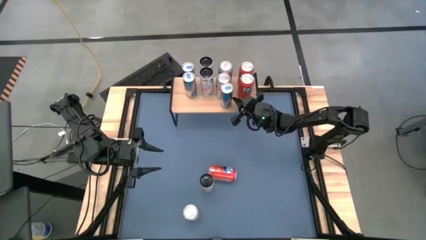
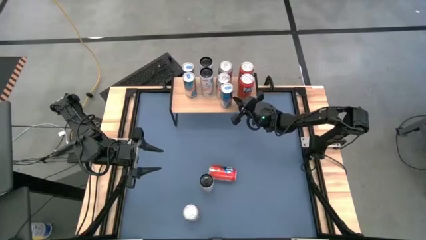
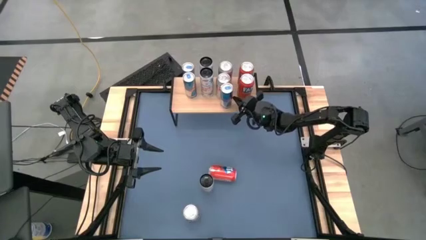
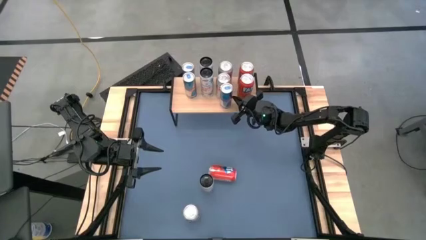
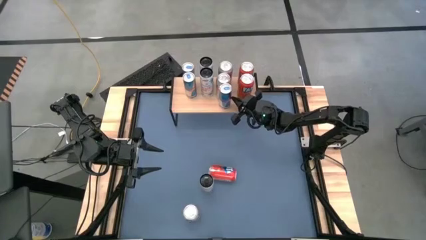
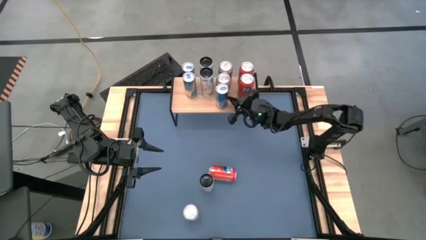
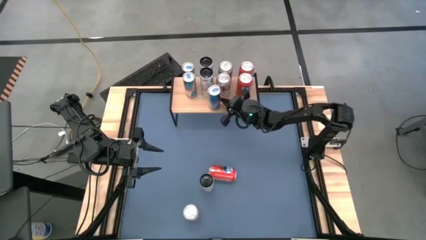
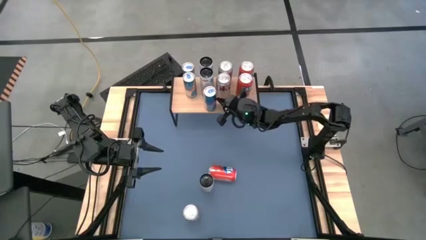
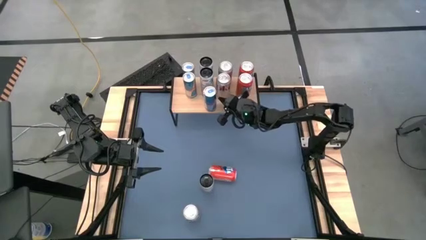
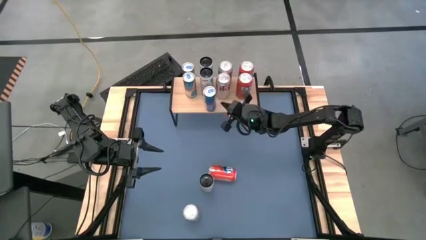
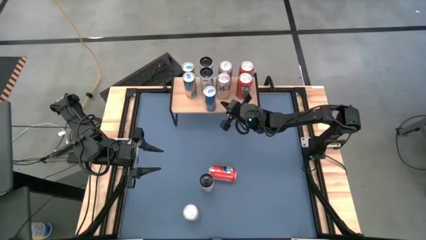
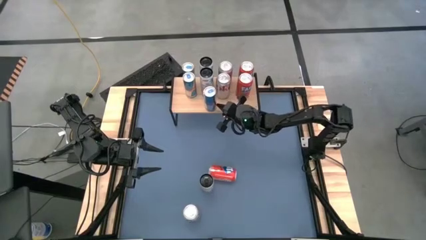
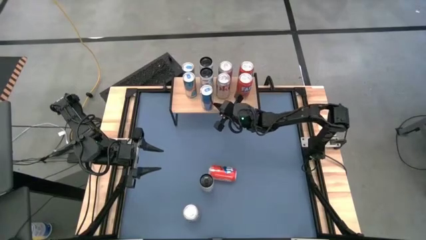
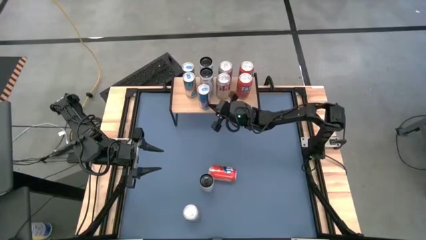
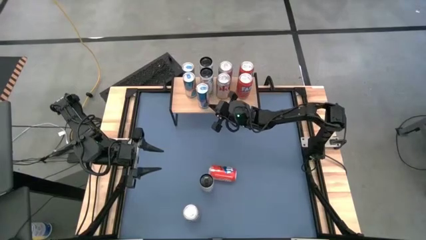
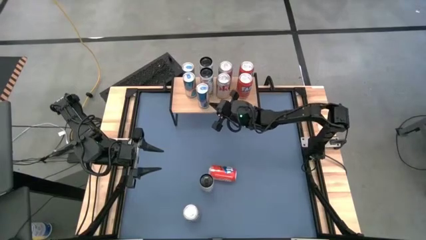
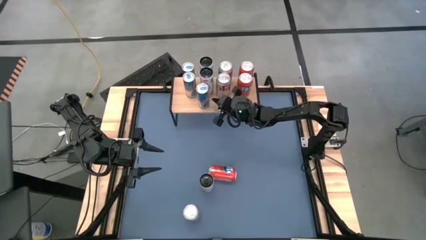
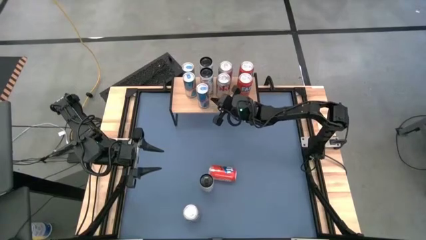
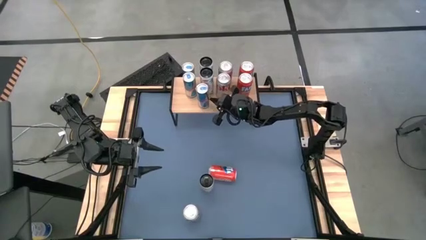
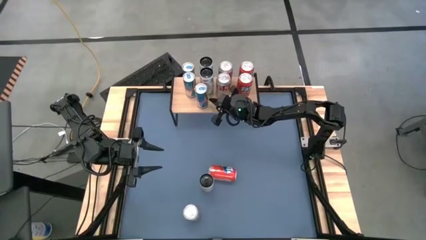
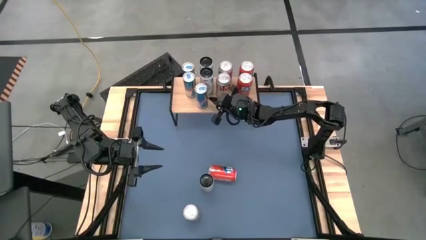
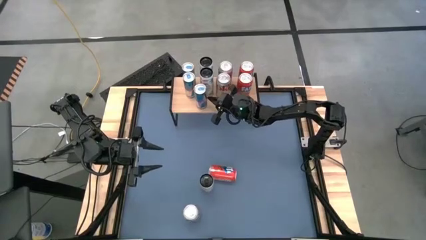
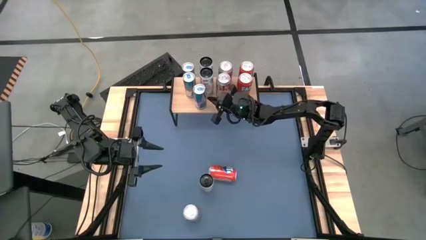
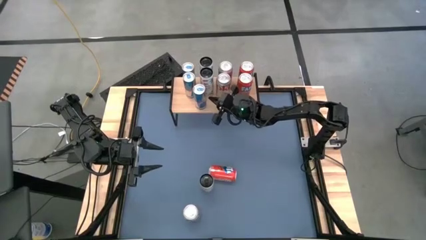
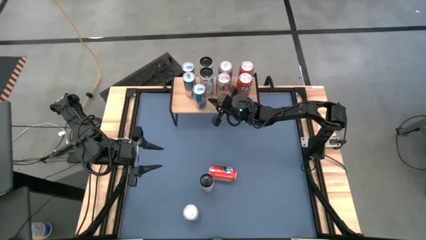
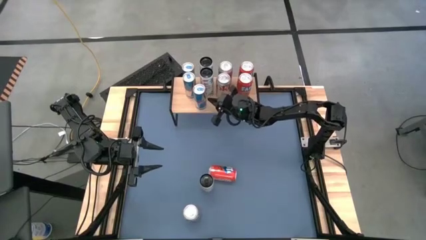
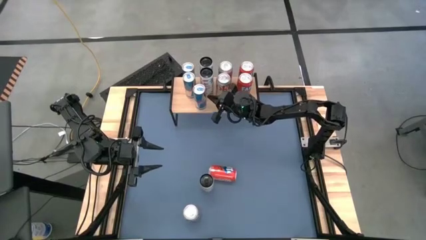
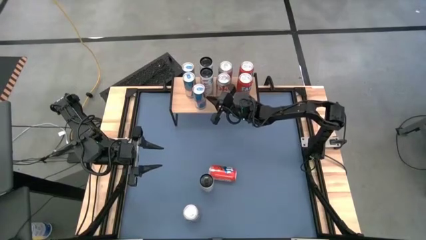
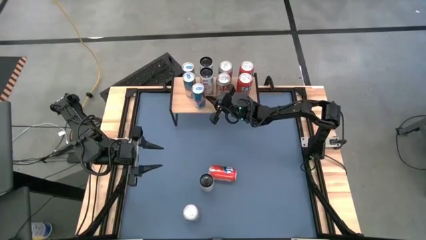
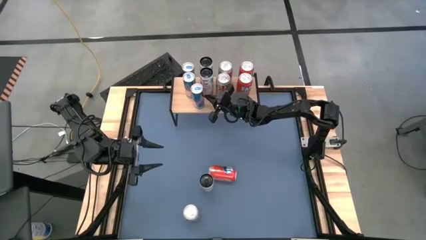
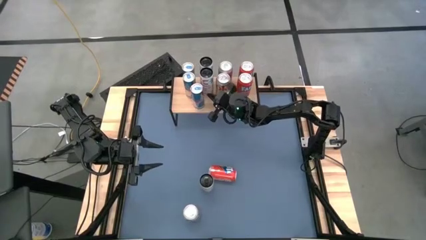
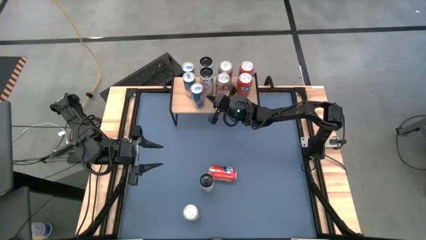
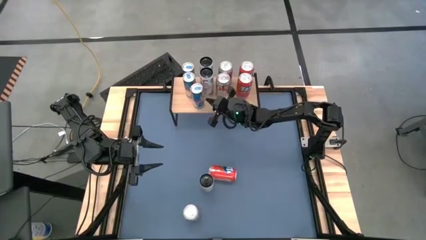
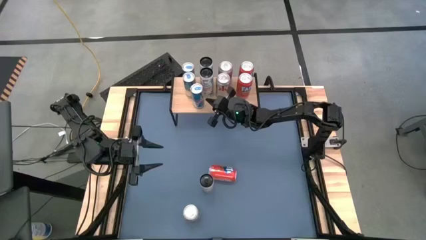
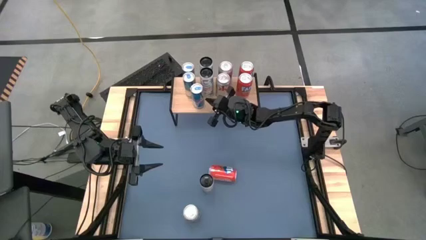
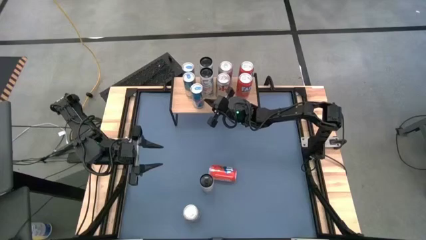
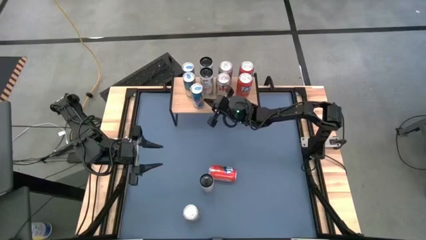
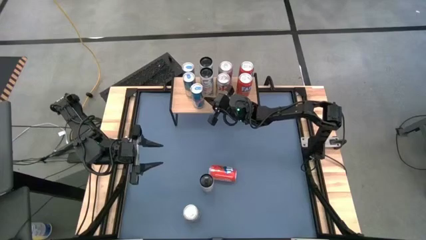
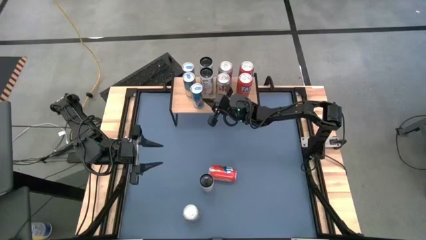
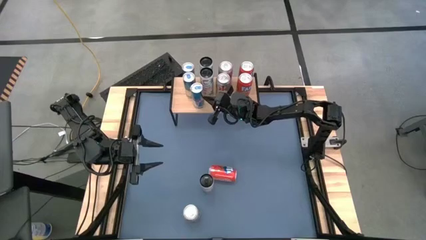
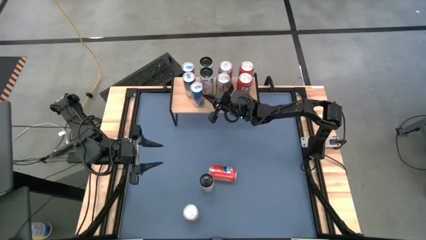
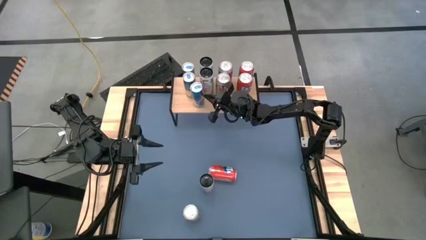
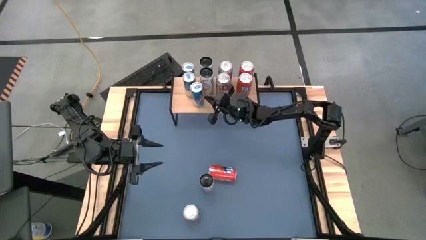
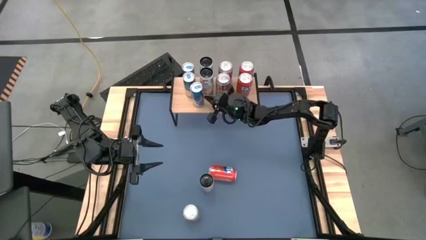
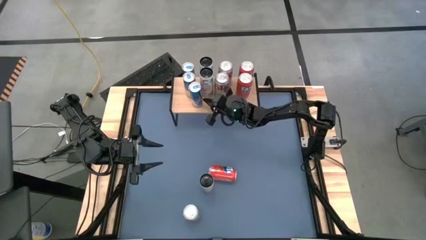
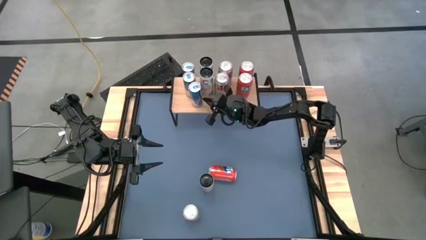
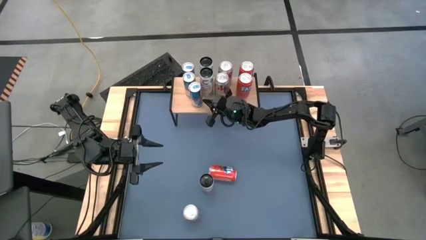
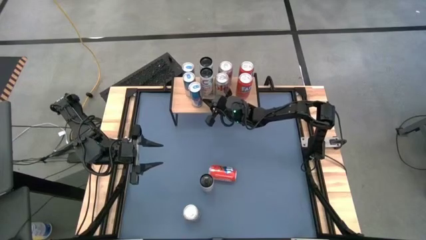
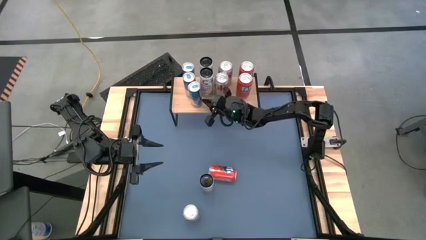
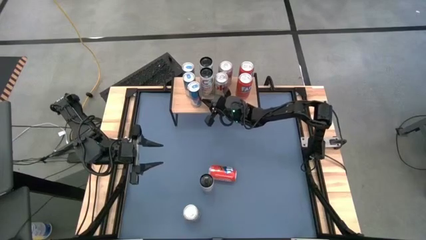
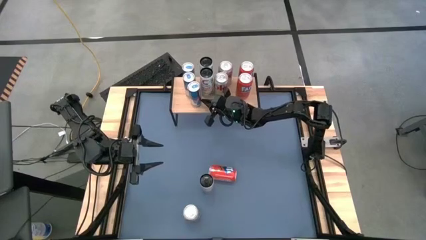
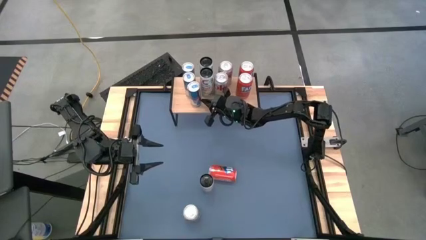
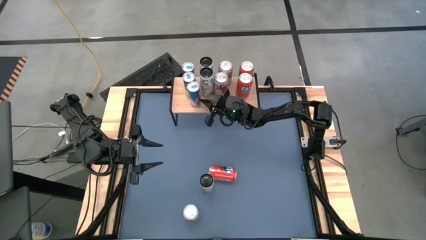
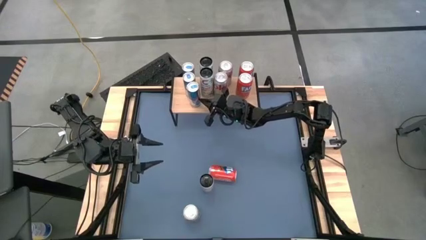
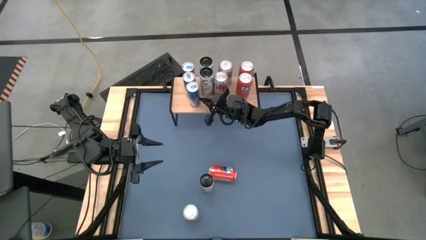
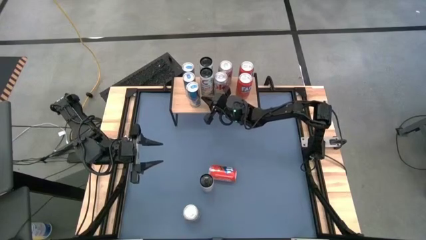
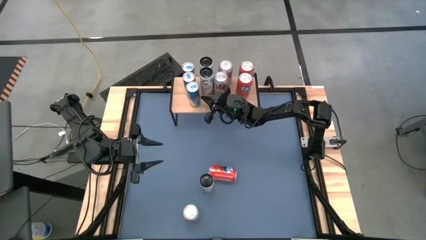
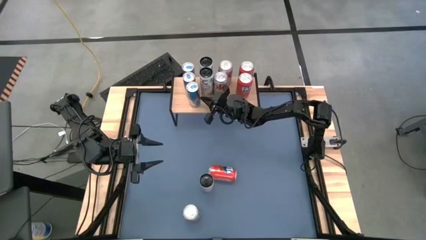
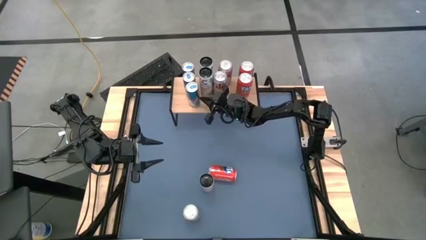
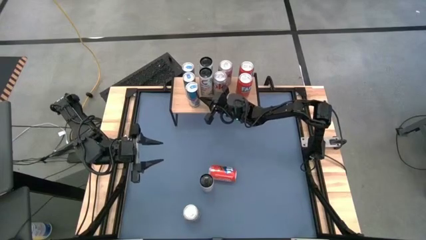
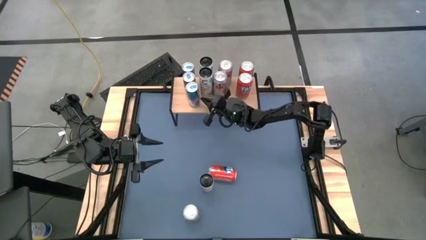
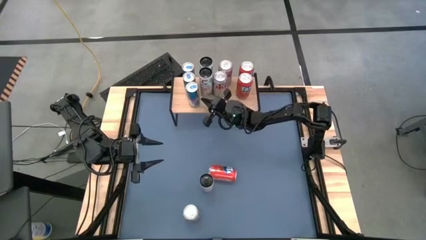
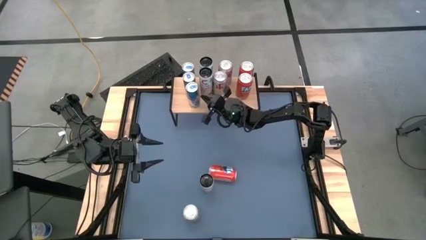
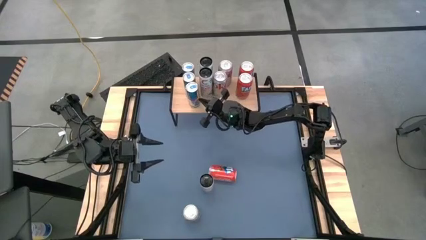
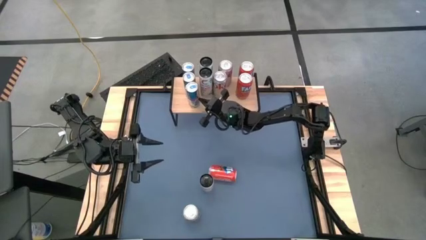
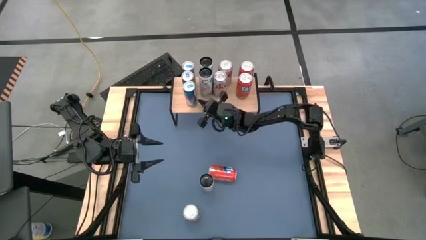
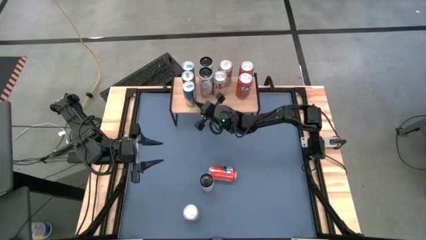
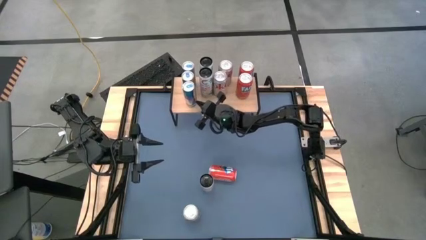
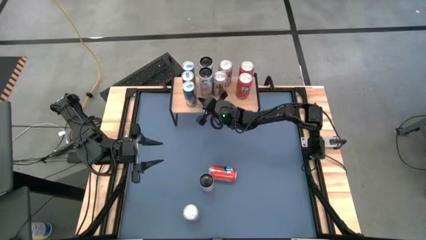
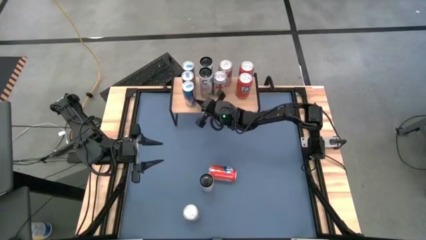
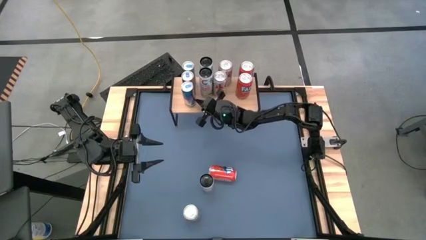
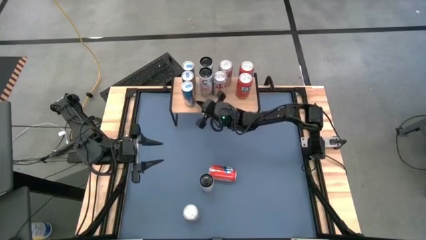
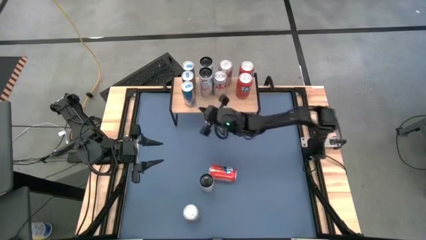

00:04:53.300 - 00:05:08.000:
Task: Place canned beverage on shelf
Put the blue soda can on the shelf aligned with the other blue soda can
